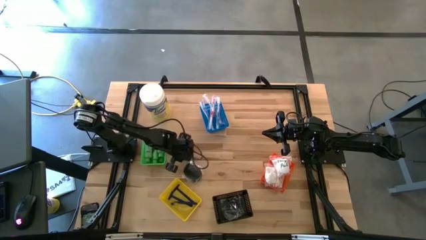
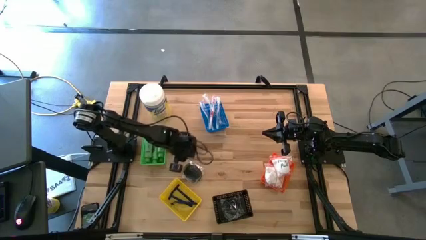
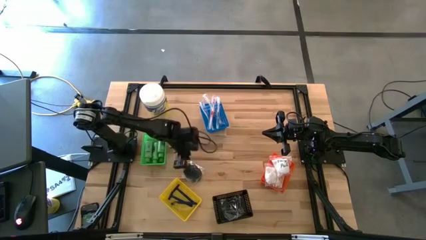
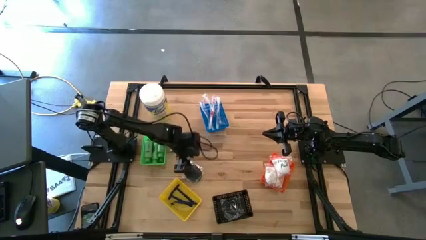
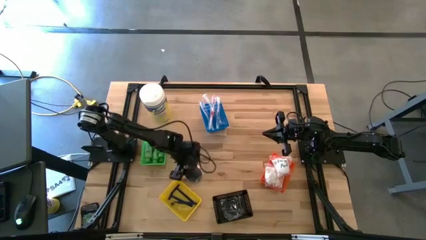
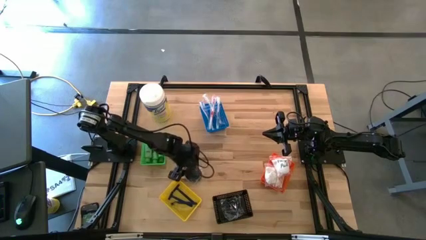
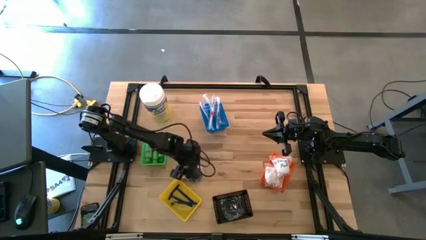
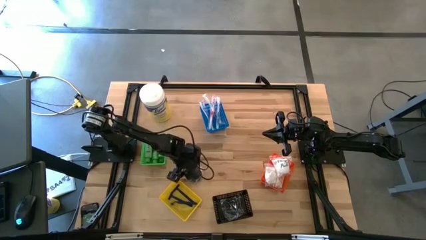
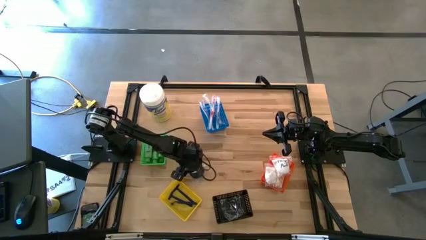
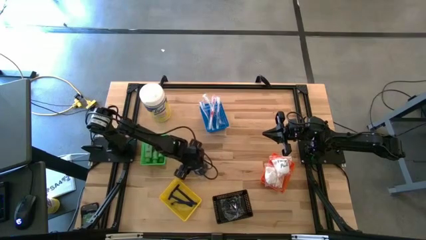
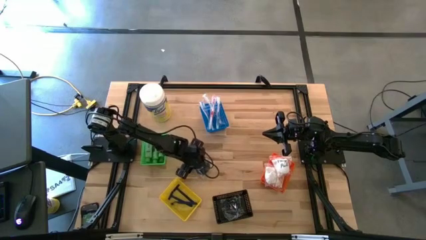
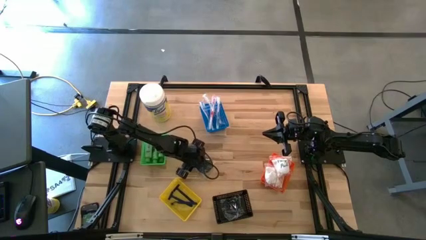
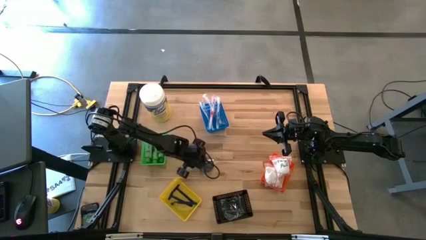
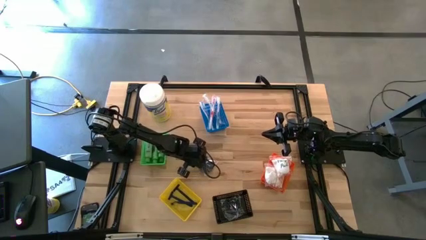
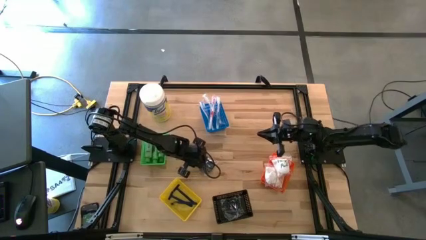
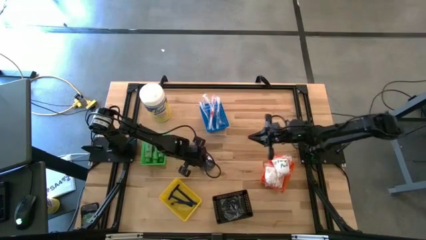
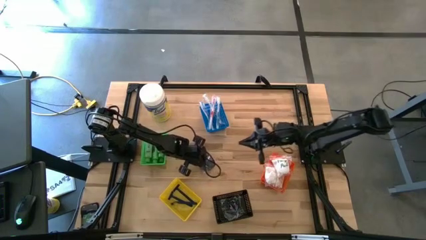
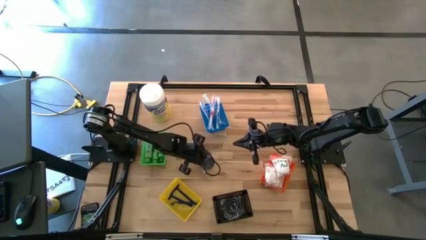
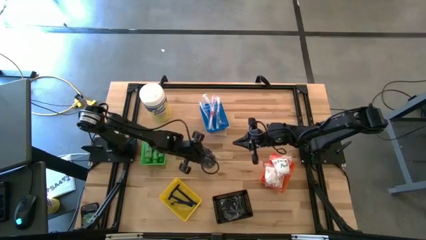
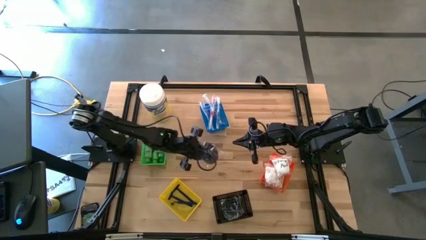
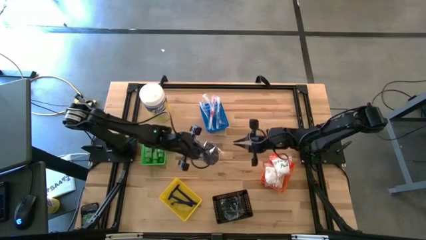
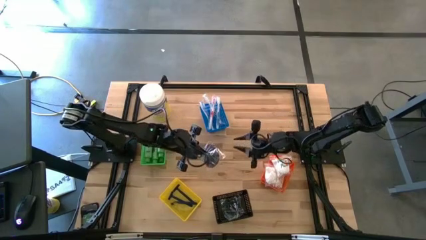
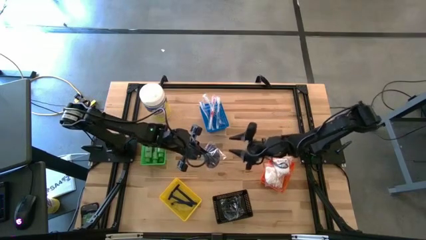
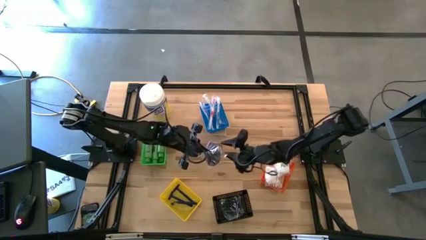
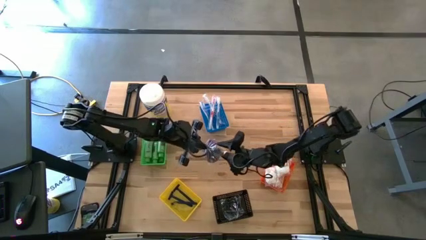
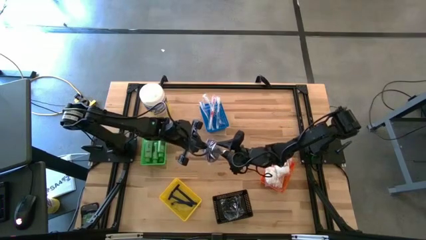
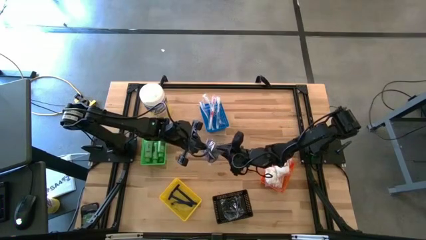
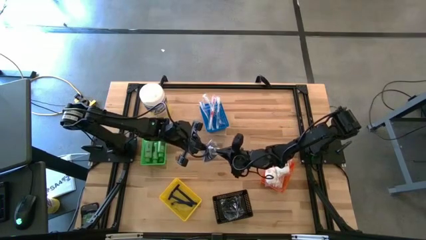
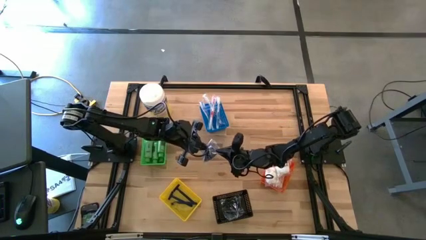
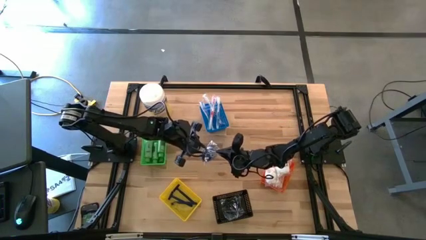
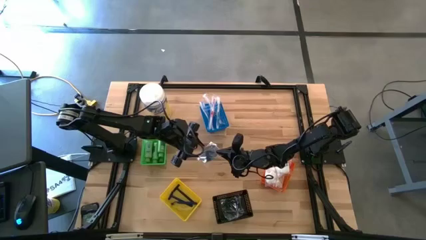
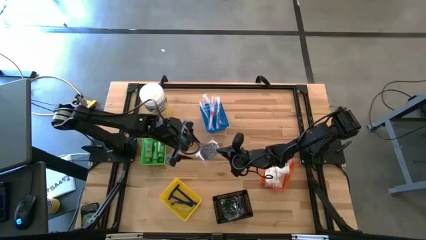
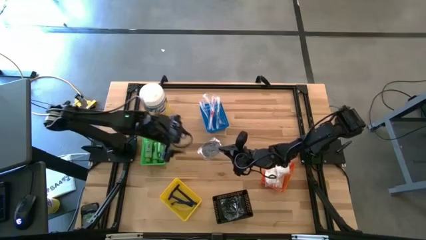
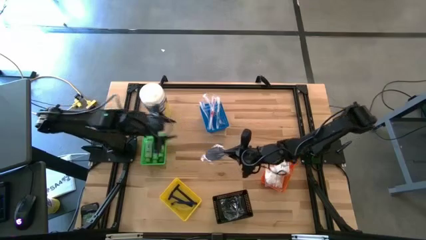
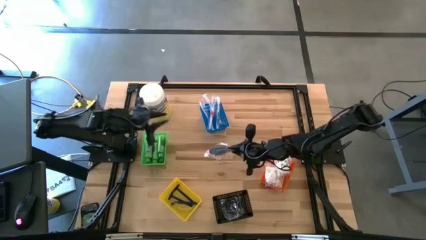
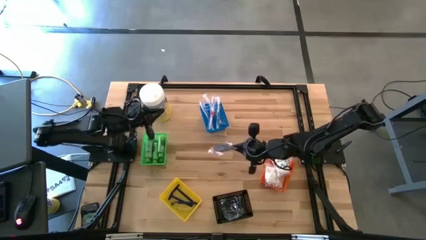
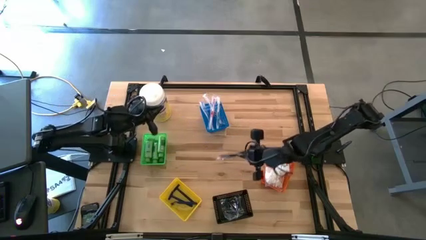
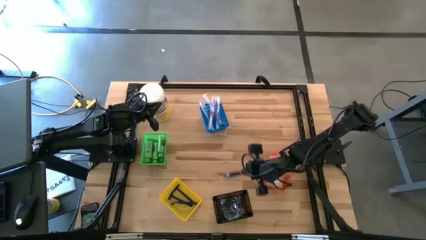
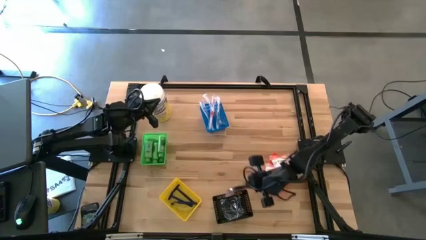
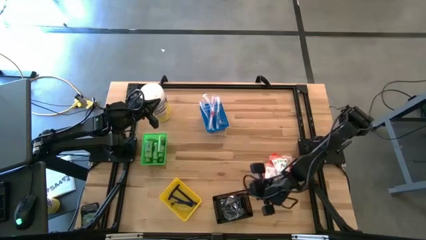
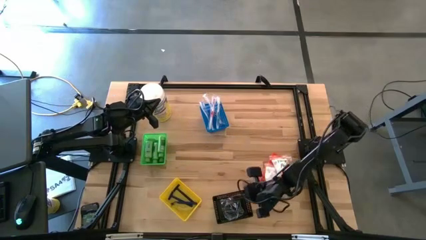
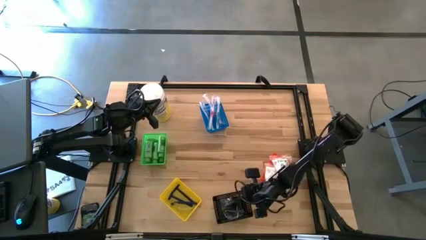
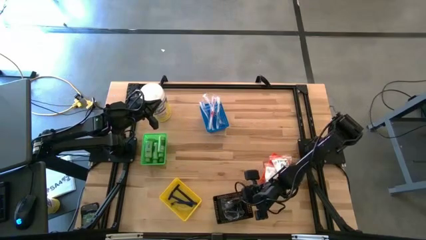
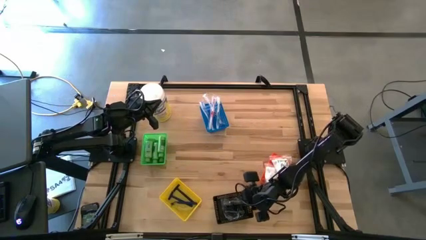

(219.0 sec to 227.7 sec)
Task: Pick & Place Travel size toiletries
Put the black hairbrush into the black bin

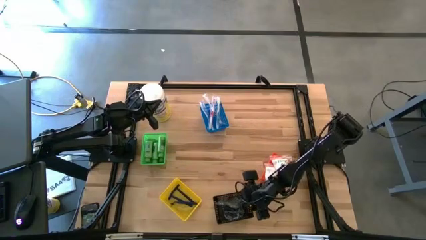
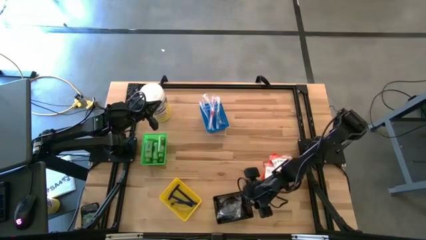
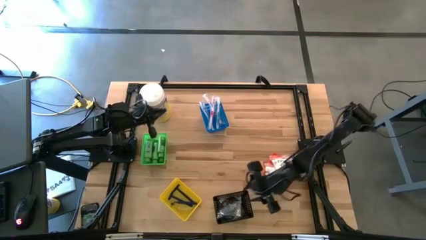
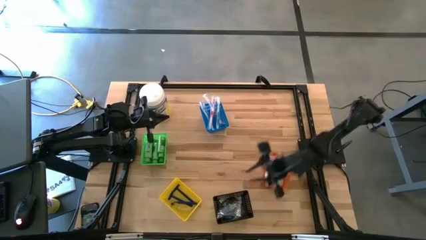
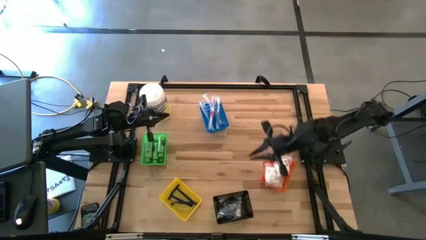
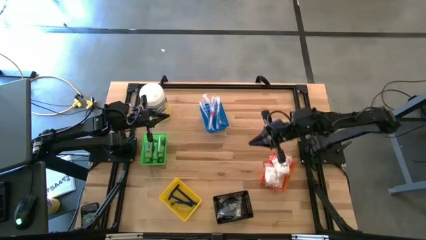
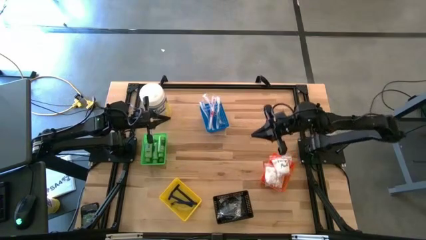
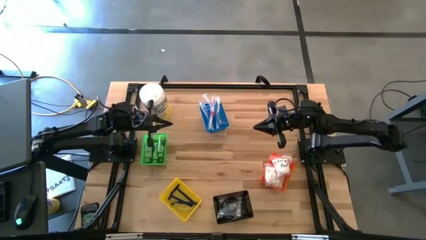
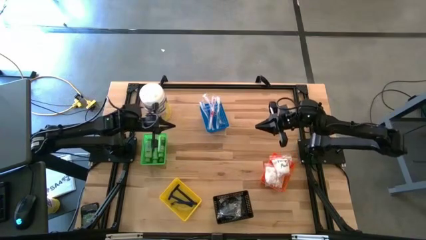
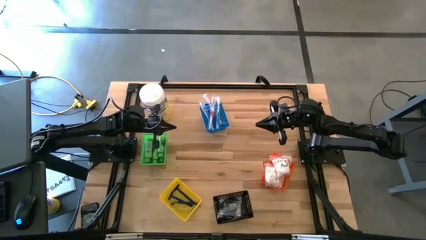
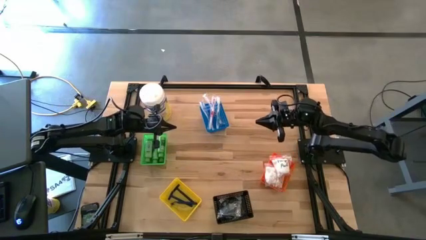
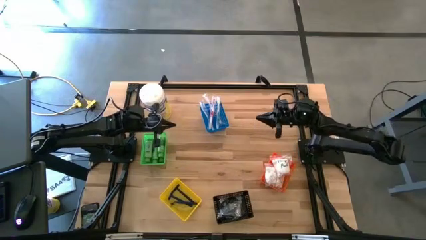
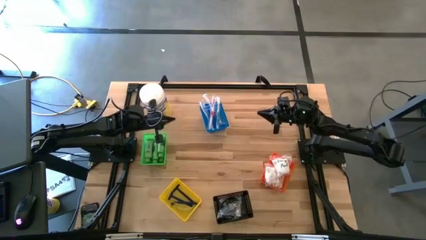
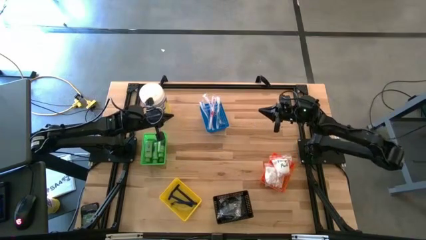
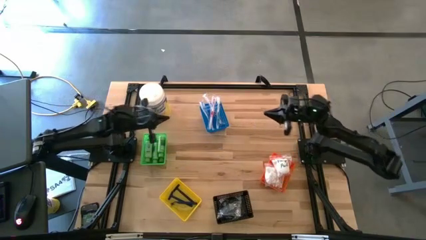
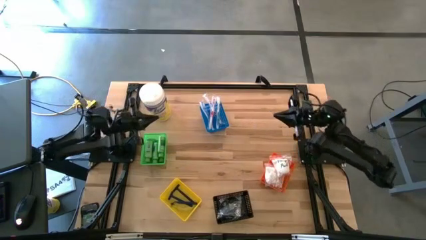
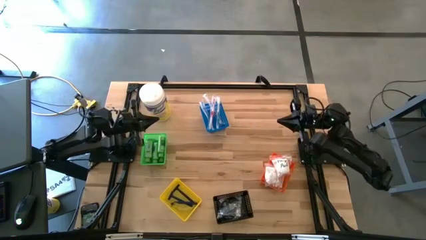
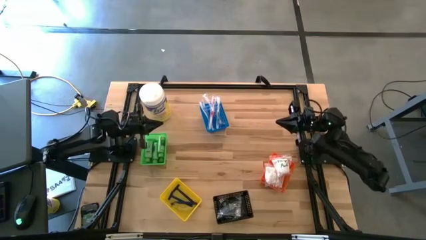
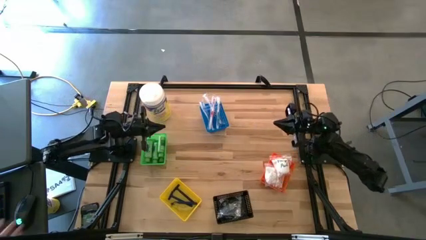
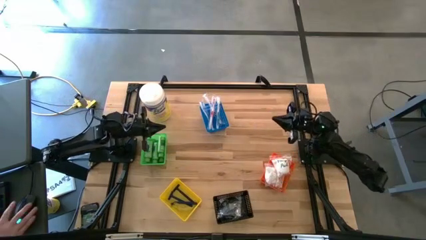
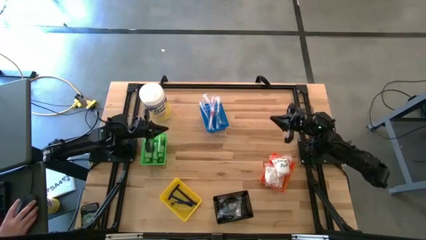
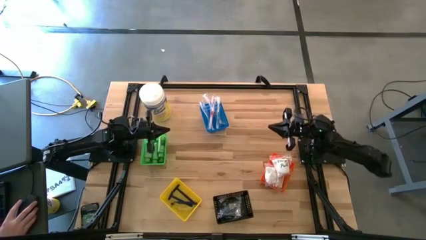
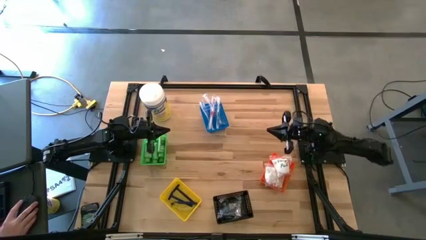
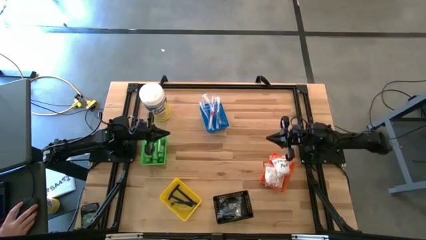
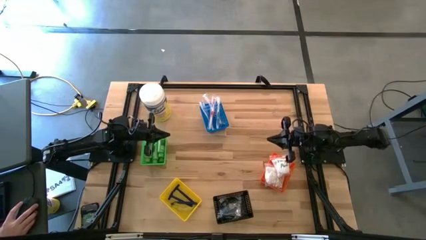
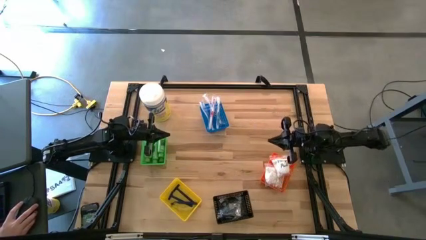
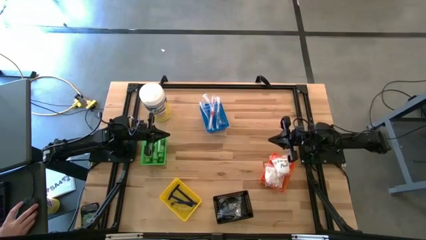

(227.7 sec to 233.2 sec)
Return to Home Position
